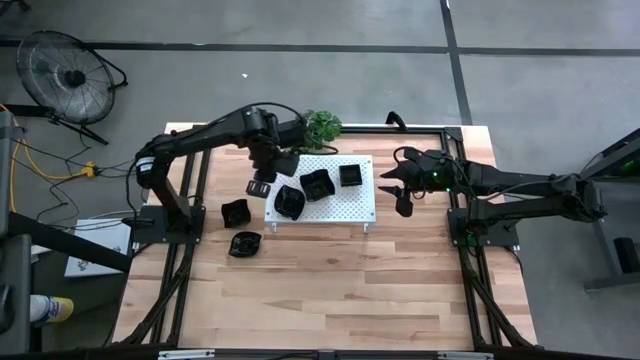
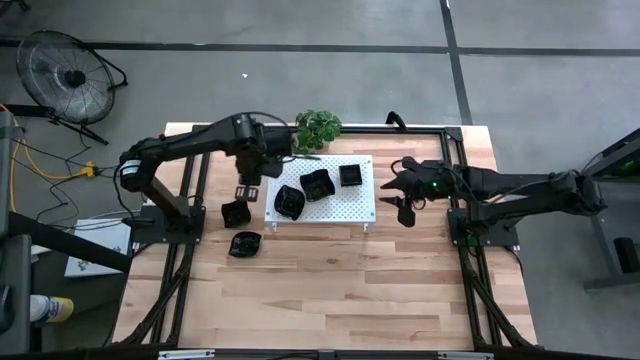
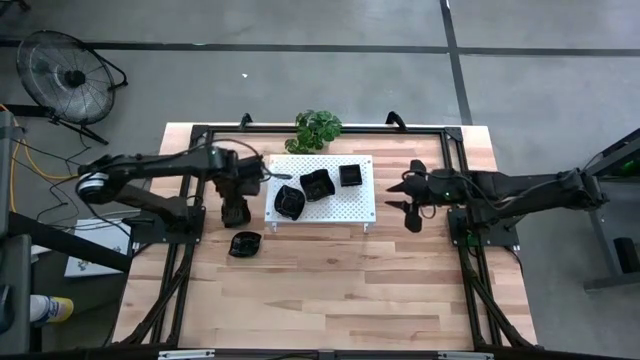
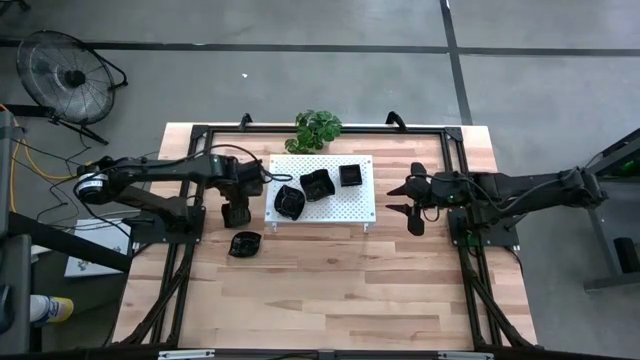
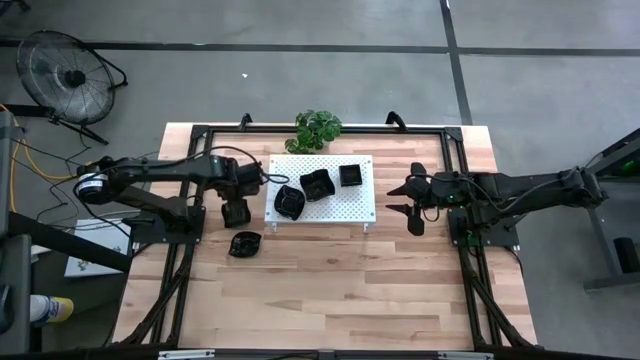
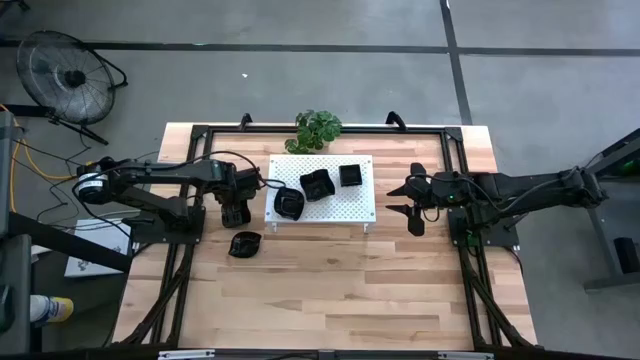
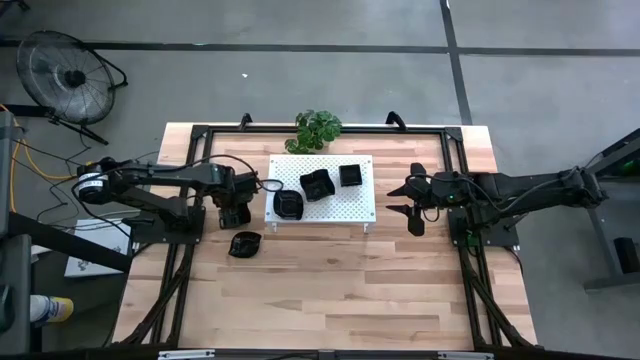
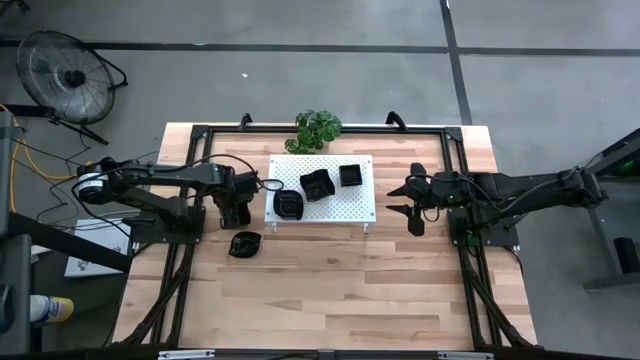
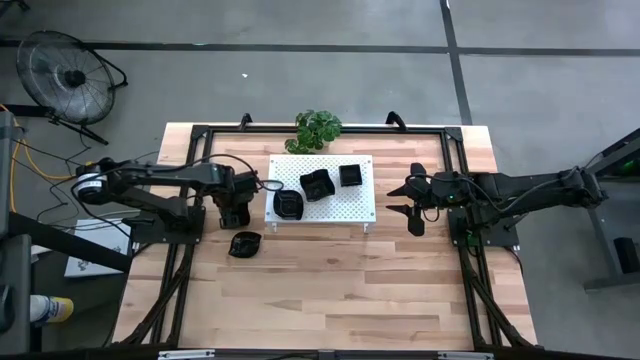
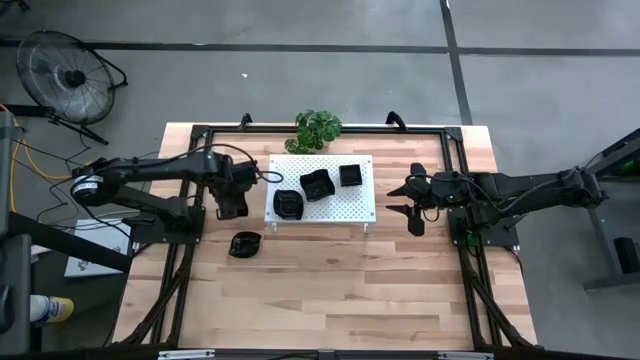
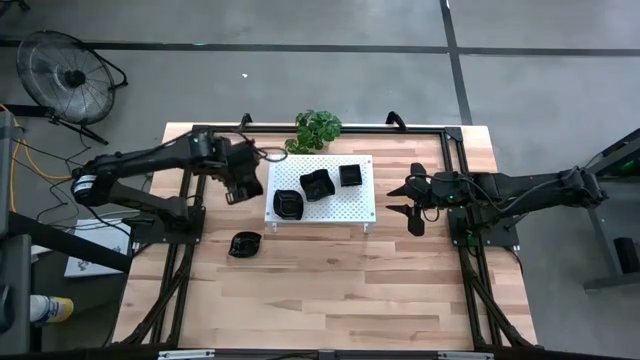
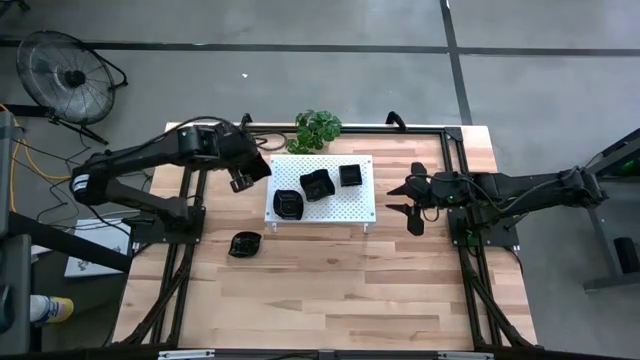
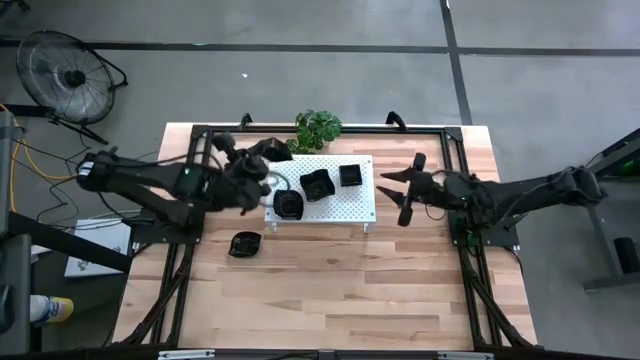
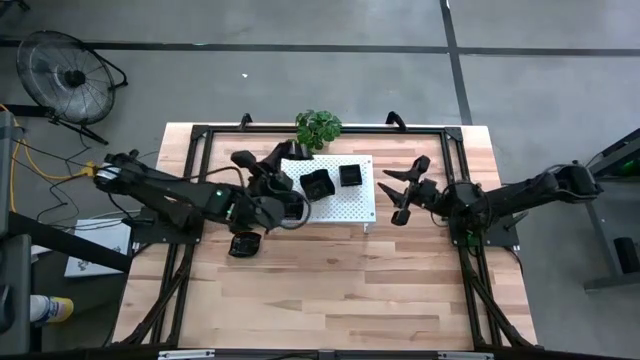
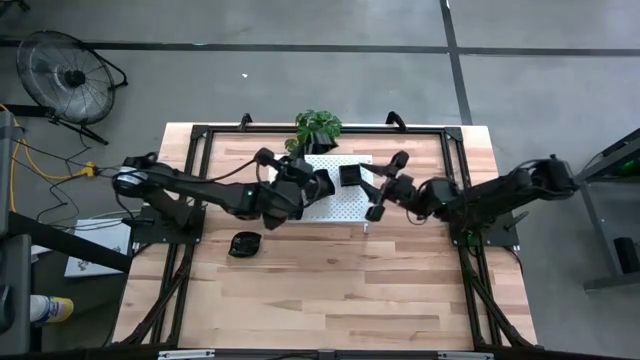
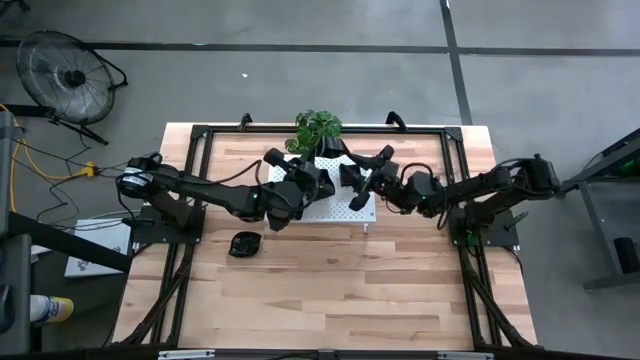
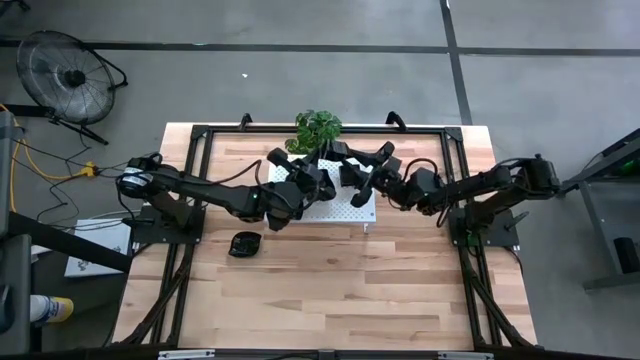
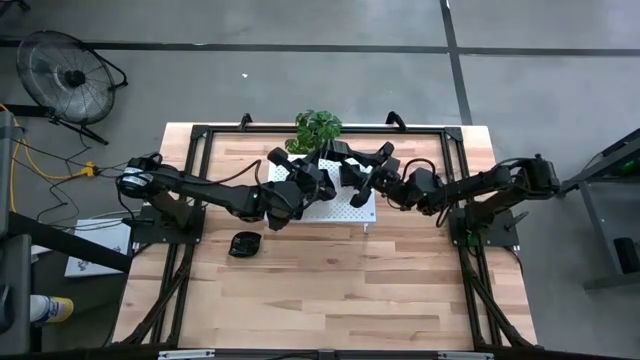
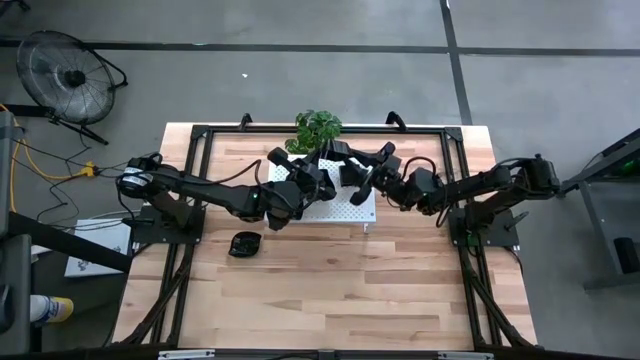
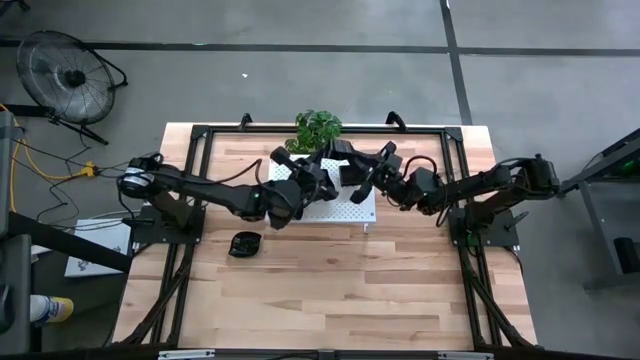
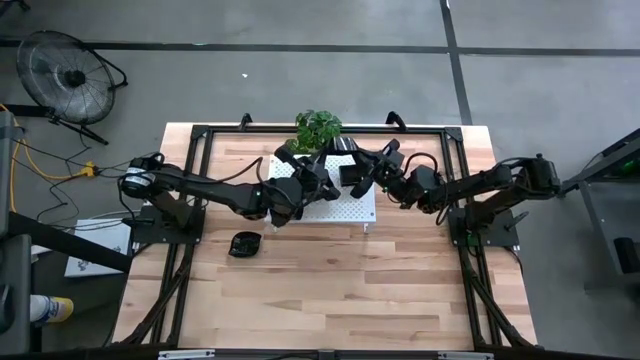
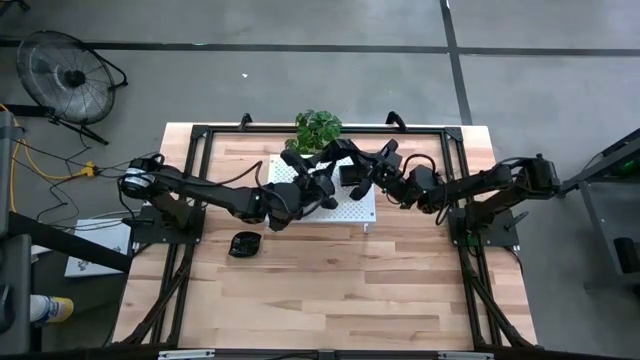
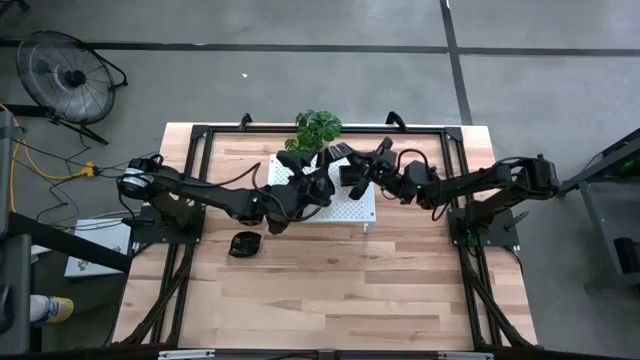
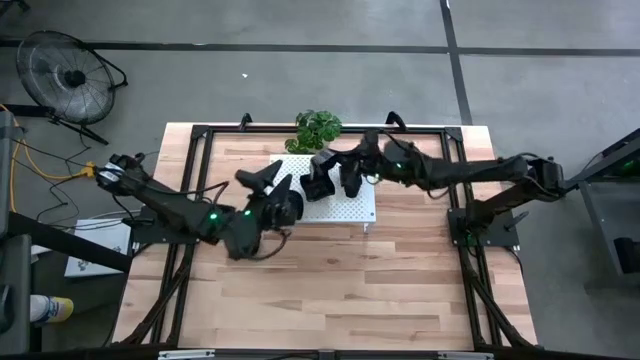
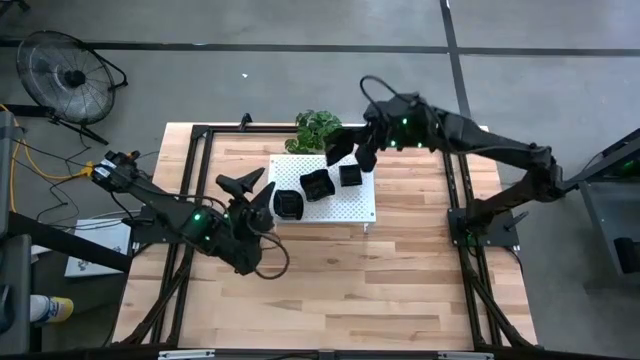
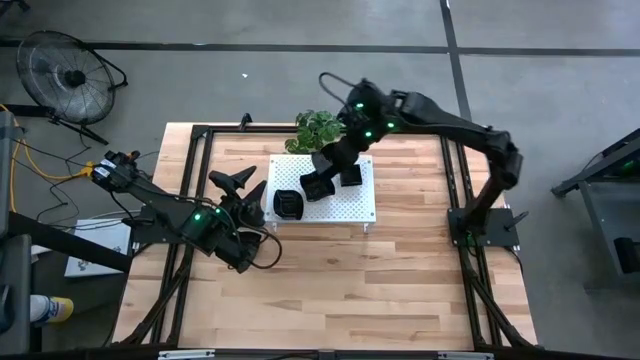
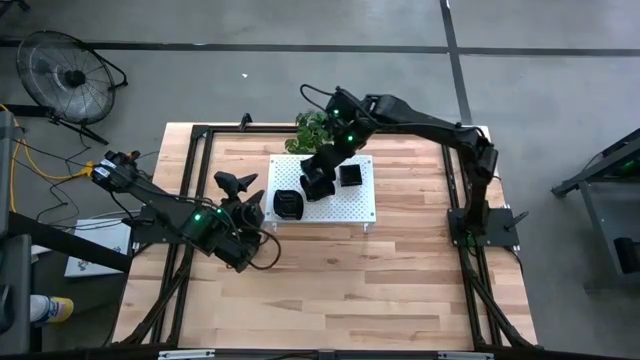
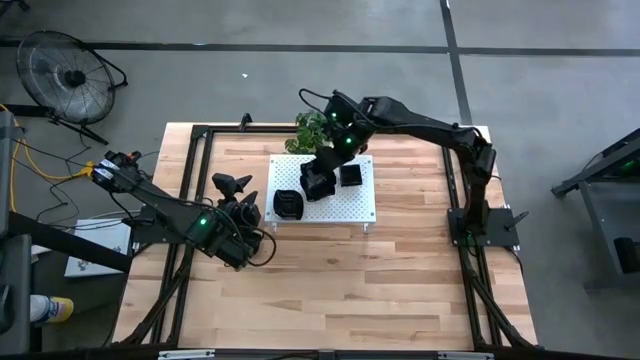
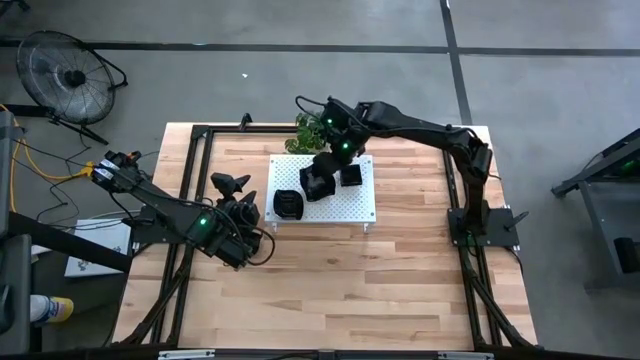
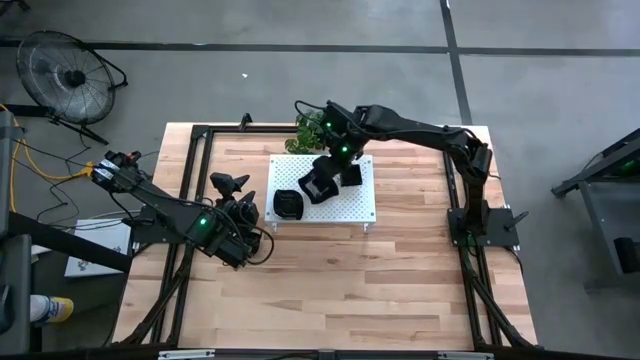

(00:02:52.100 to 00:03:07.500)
Task: Pick & Place Mini shaped plates
Stack the distorted square plate on top of the distorted square plates on the shelf

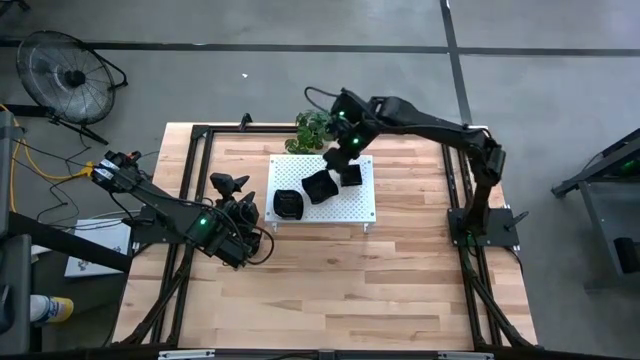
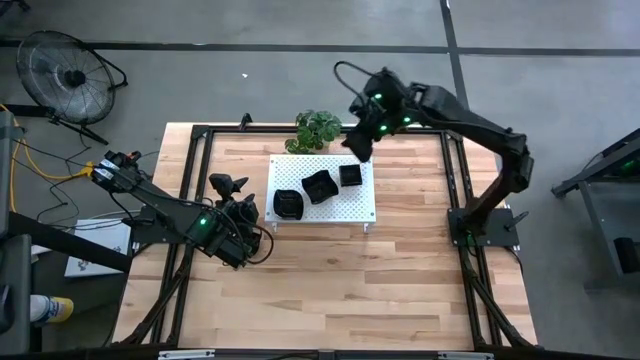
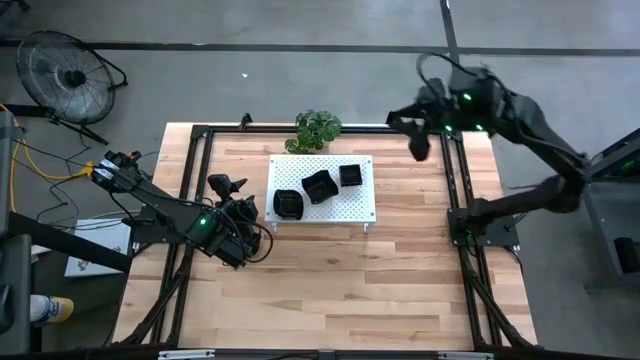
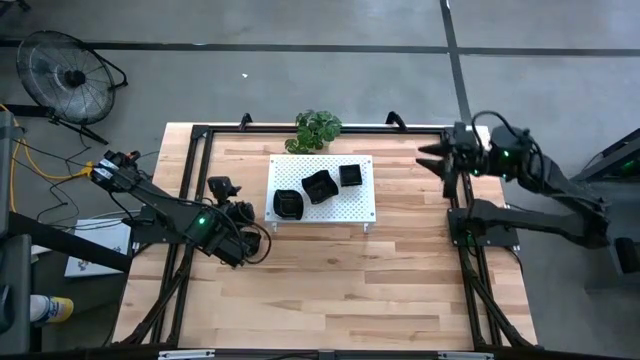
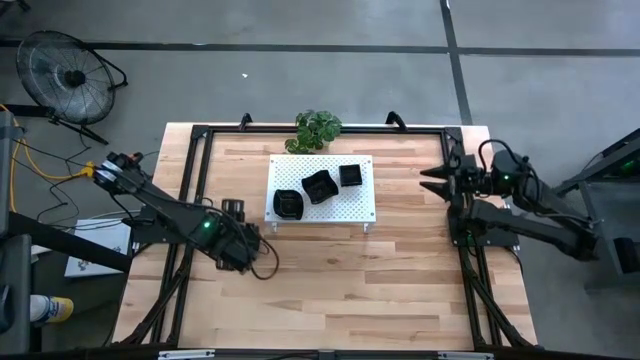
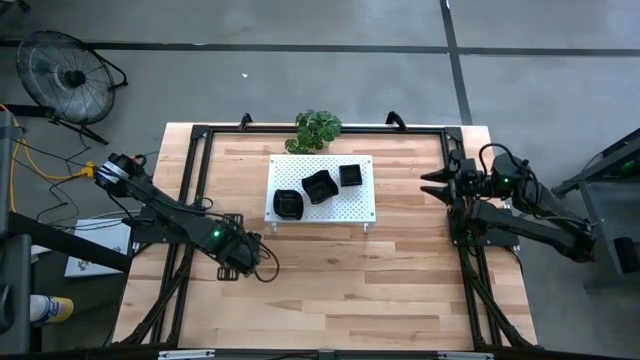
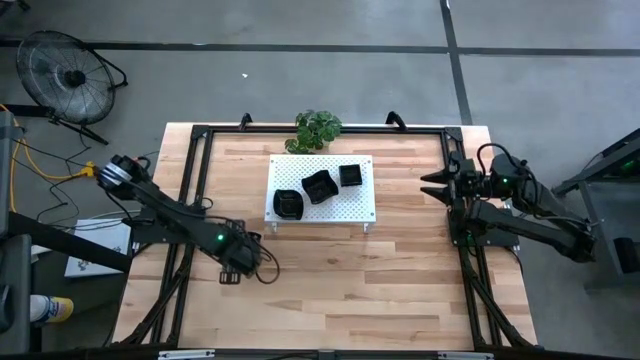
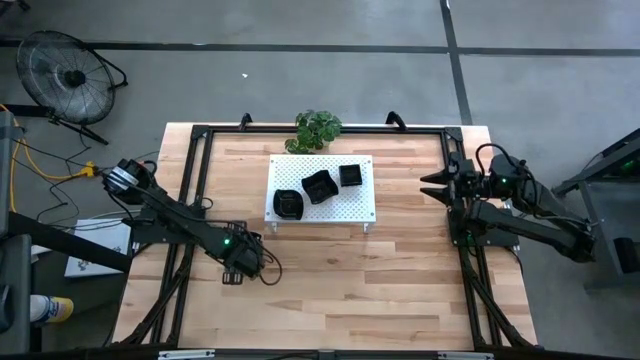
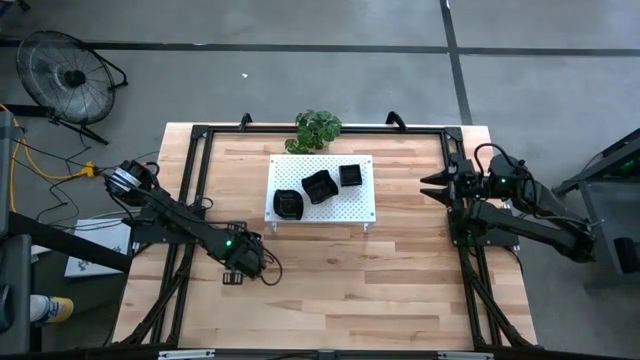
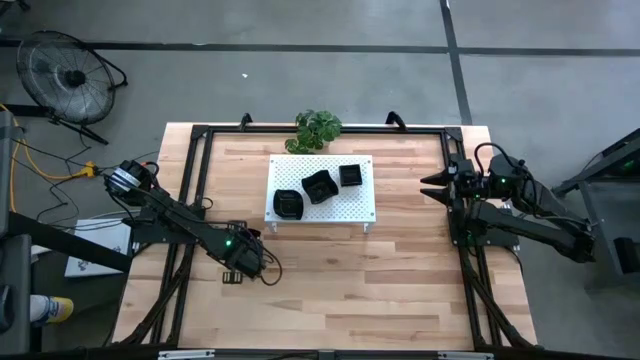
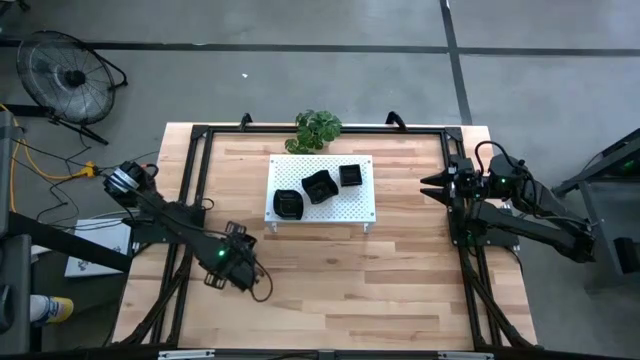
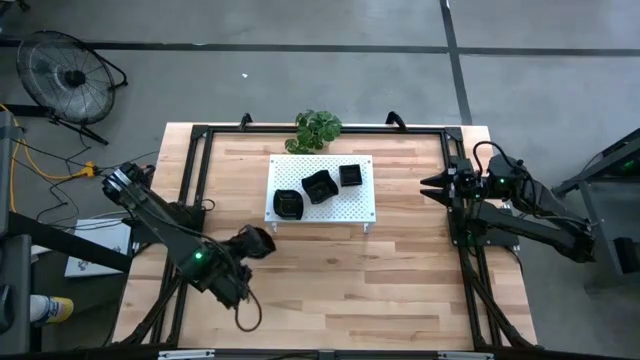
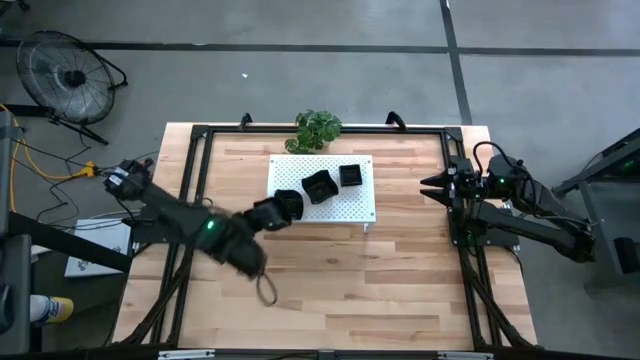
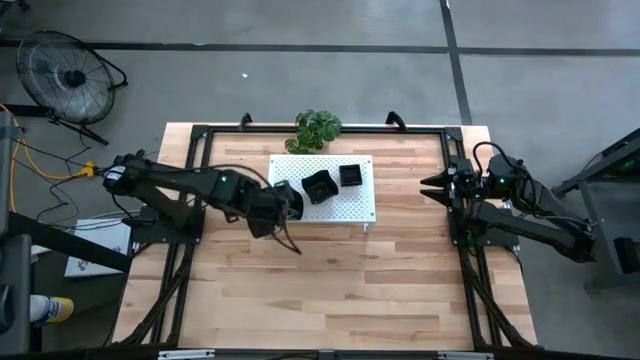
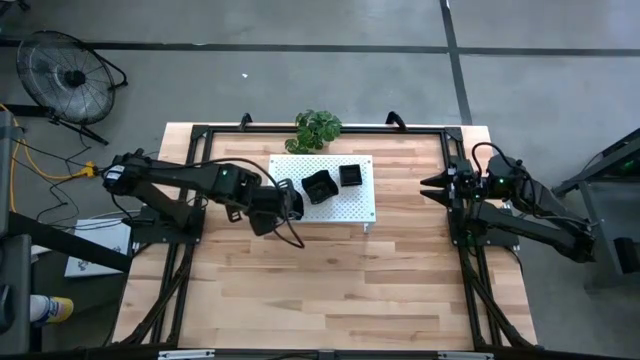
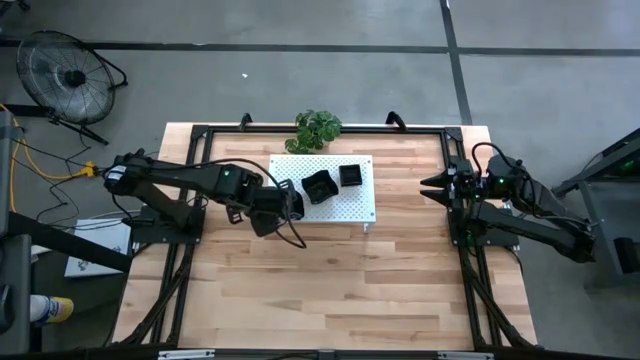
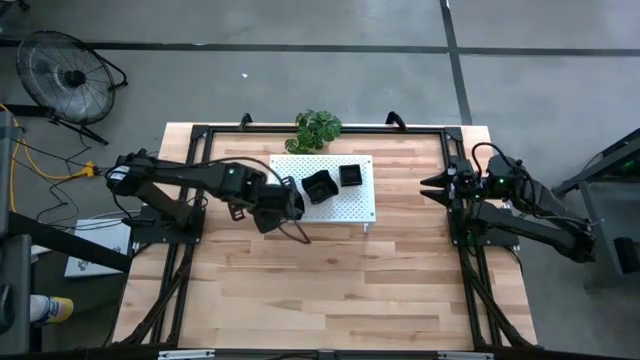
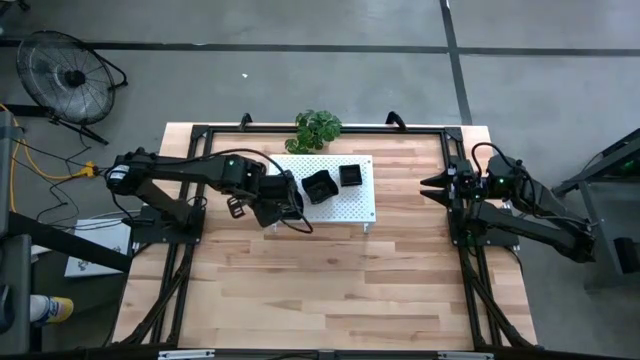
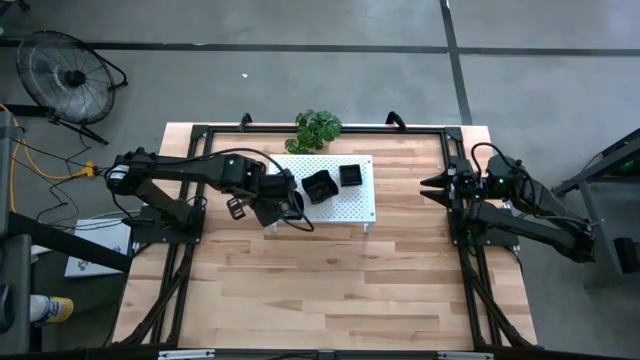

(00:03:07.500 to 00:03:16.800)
Stack the leaf shaped plate on top of the leaf shaped plates on the shelf
